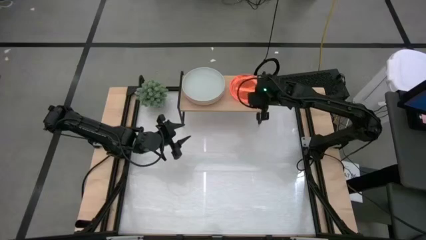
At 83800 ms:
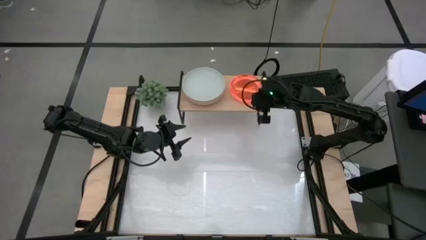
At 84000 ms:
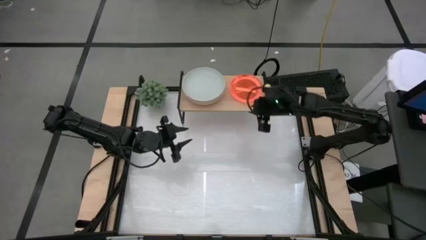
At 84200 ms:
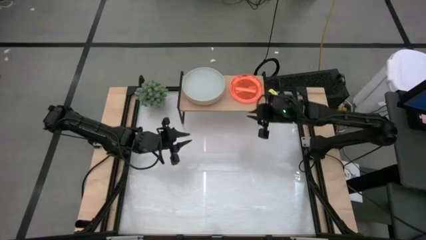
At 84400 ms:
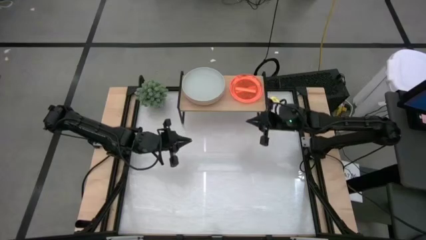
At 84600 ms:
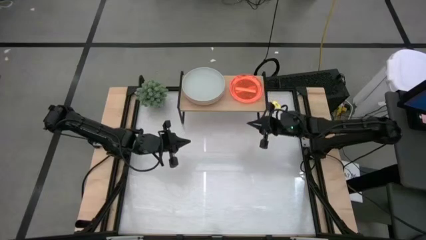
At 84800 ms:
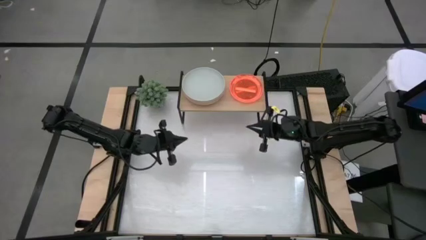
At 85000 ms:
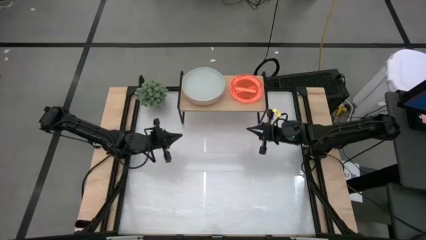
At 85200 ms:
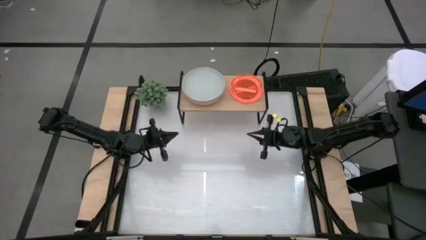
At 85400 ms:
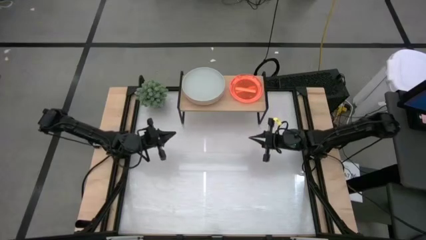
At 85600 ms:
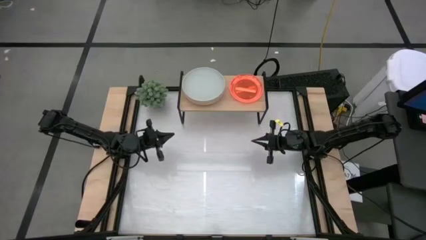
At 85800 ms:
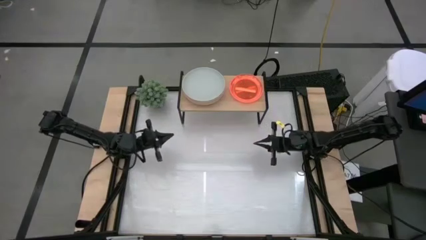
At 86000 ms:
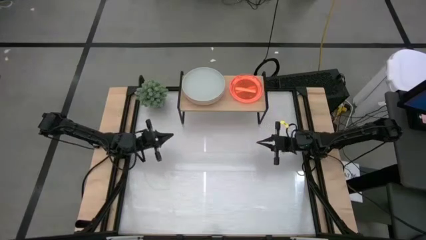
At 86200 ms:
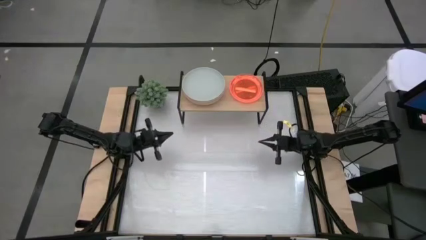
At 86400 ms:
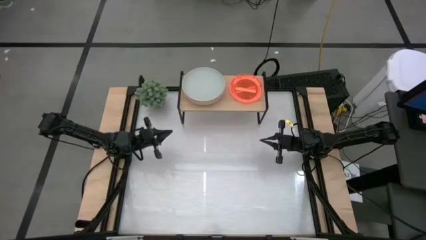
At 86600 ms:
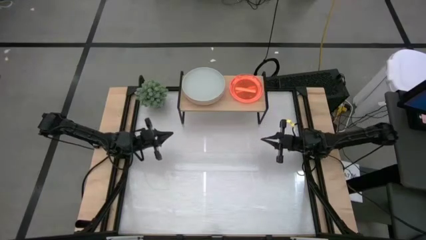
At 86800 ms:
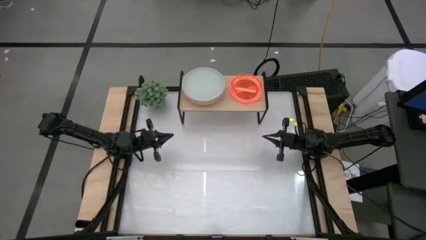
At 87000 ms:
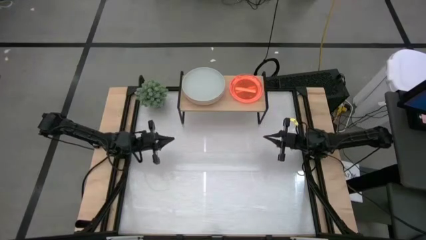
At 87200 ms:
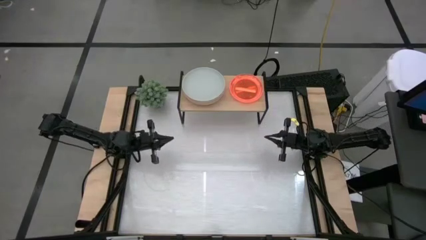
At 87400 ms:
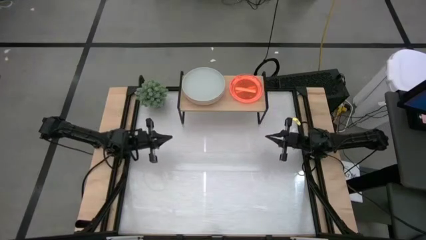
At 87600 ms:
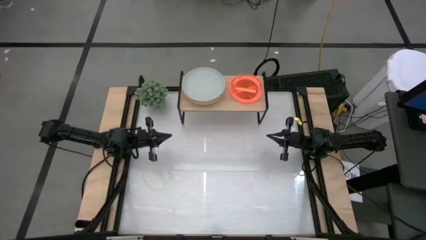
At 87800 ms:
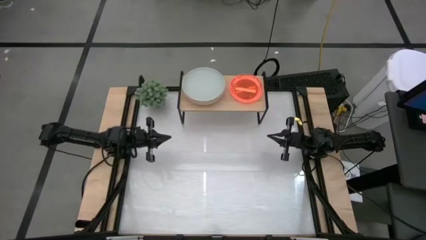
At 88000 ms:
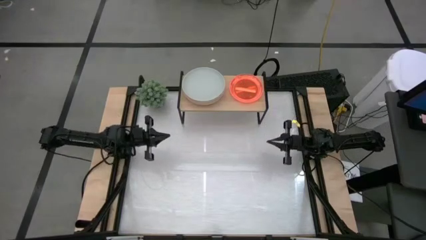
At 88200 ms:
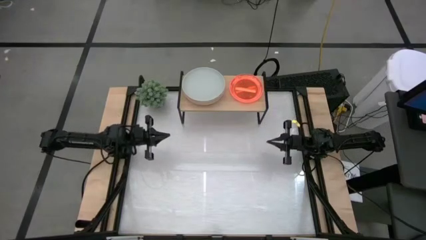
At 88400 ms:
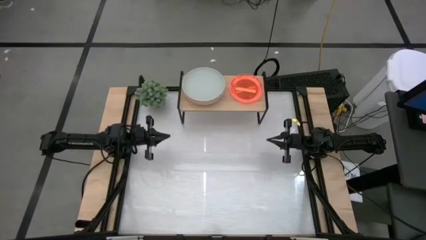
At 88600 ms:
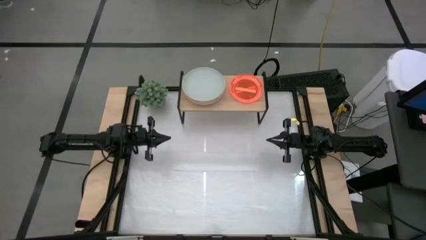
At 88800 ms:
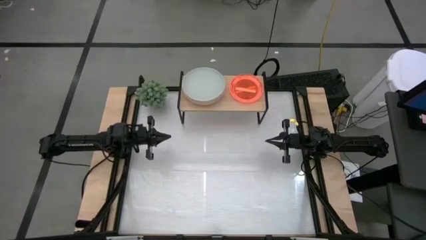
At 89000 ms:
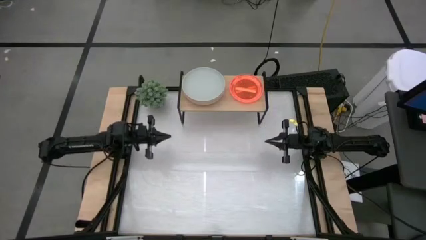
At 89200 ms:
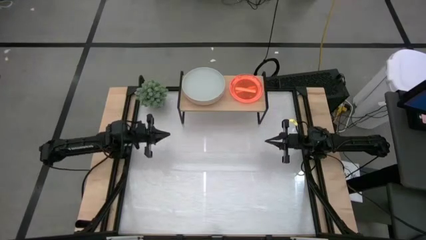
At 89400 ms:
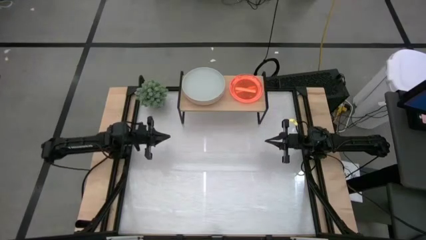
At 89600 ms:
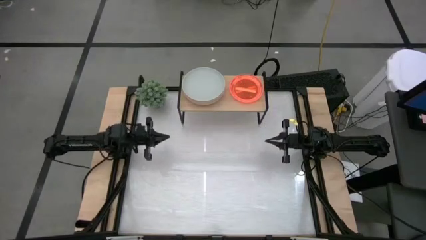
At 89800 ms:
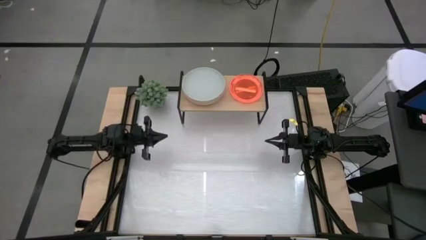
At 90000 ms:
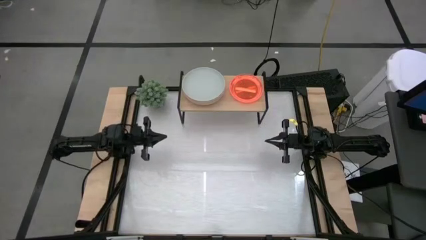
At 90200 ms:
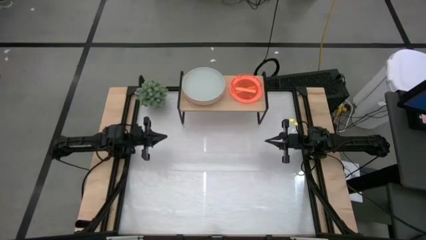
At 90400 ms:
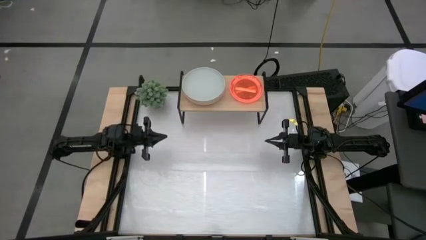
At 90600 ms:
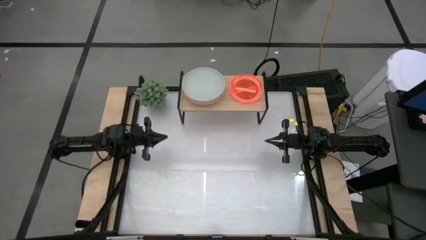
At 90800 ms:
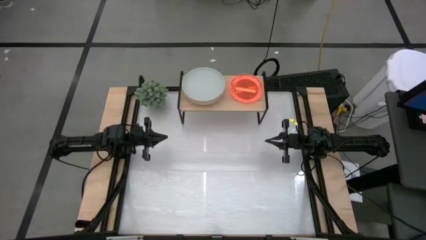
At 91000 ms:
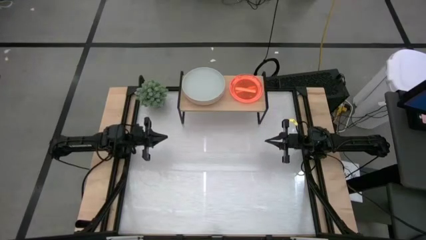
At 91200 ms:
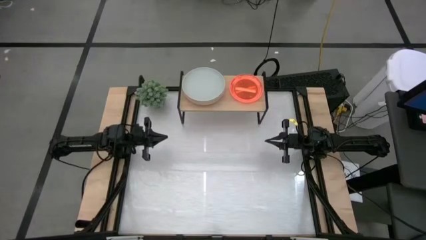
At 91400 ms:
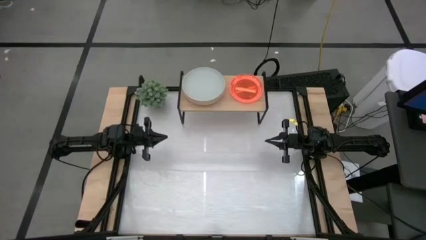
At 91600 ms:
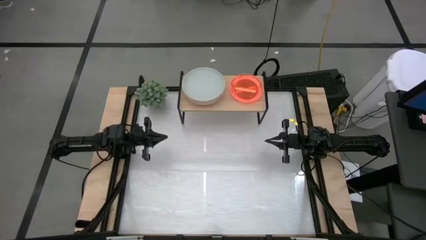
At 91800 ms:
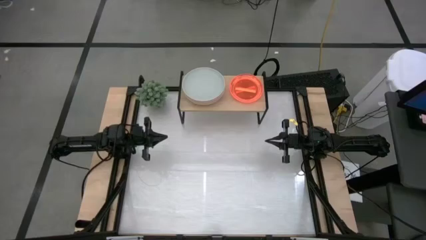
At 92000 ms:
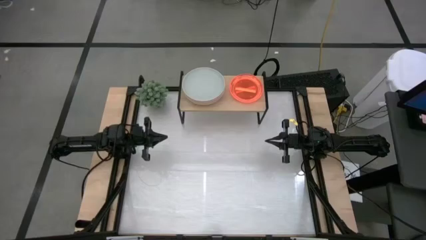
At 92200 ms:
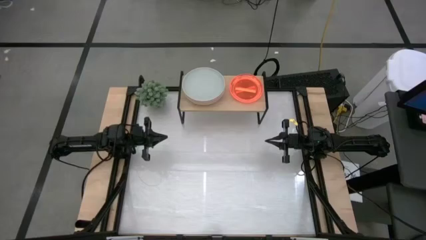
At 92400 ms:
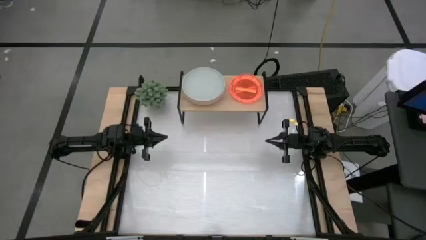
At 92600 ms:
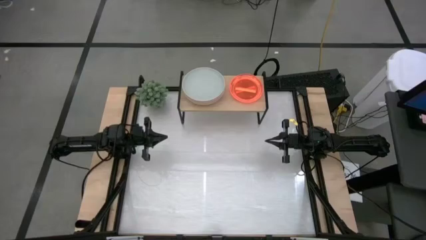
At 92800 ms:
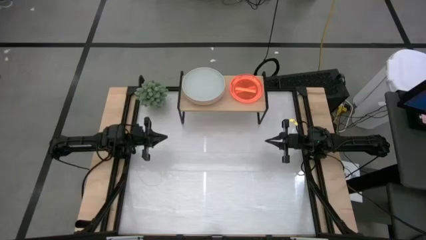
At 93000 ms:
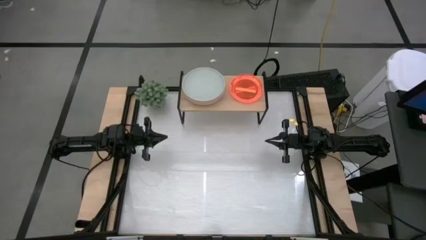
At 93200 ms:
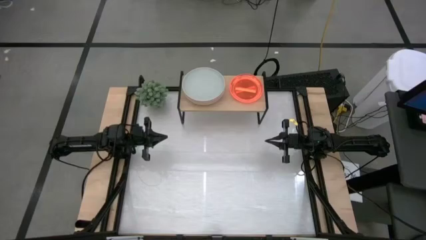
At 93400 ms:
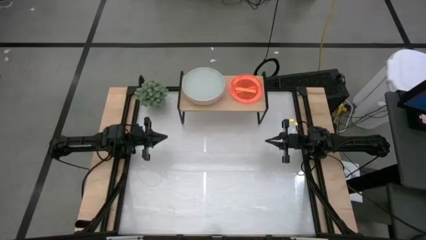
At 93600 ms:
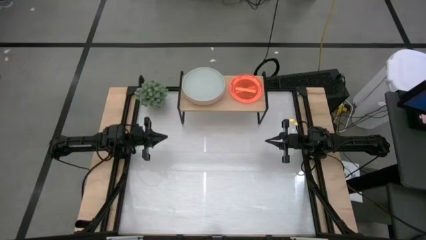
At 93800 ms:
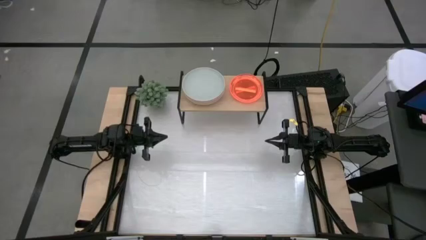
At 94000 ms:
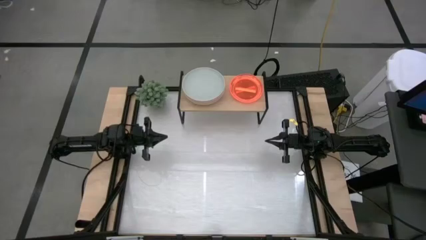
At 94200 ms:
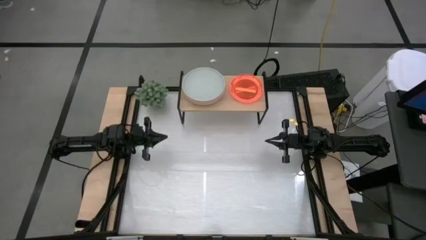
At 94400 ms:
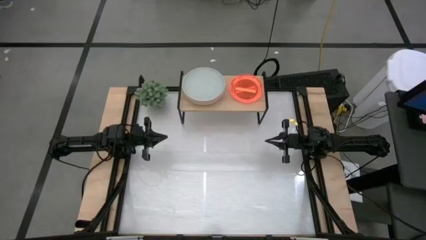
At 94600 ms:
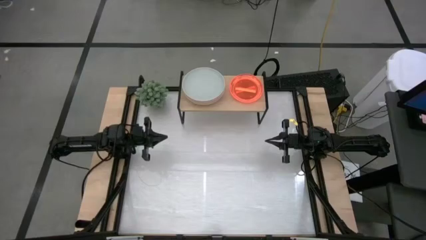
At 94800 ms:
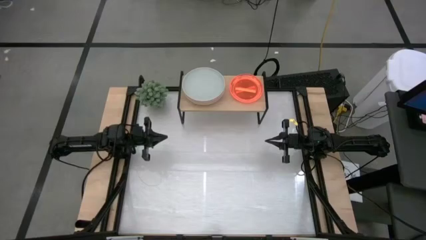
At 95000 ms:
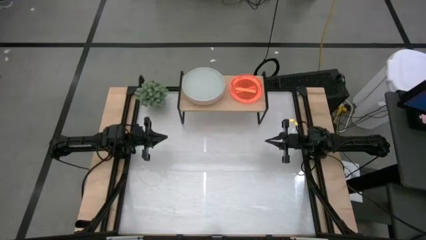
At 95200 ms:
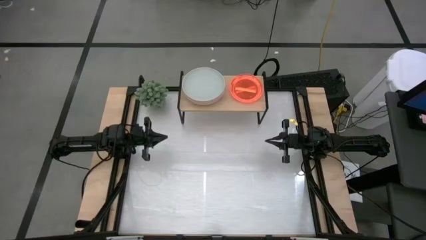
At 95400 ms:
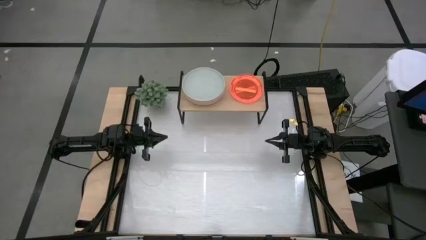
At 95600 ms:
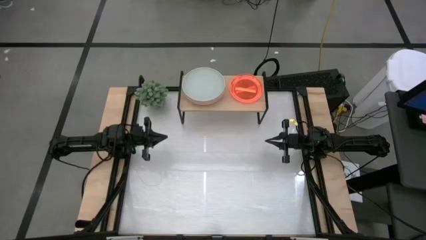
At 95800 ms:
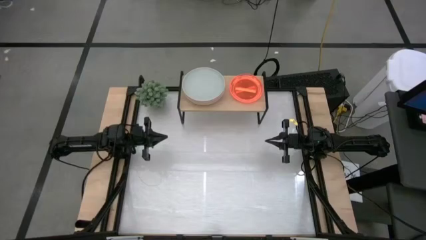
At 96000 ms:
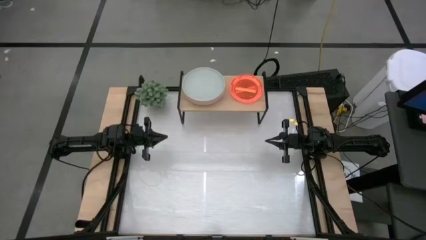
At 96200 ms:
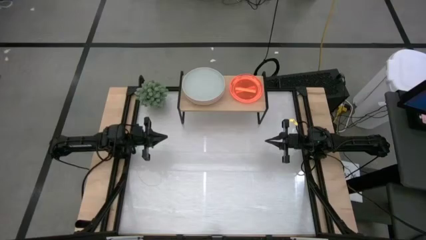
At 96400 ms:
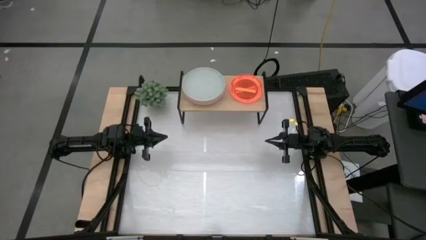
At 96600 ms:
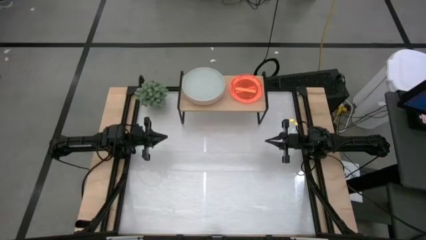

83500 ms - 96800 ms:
Task: Place and stack plates onto a shelf
Return to Home Position
